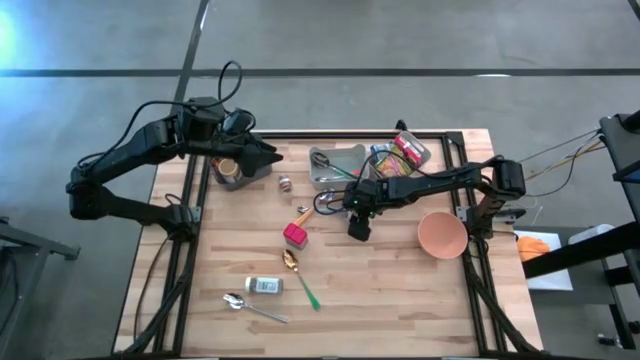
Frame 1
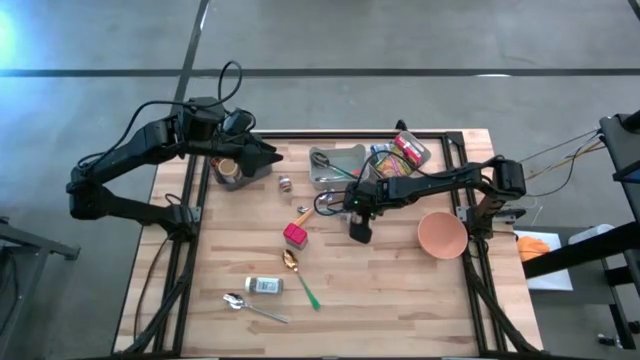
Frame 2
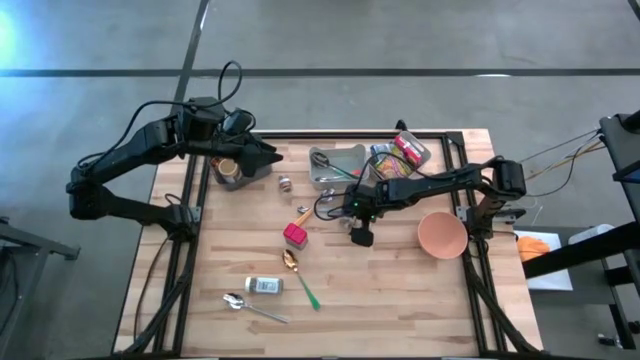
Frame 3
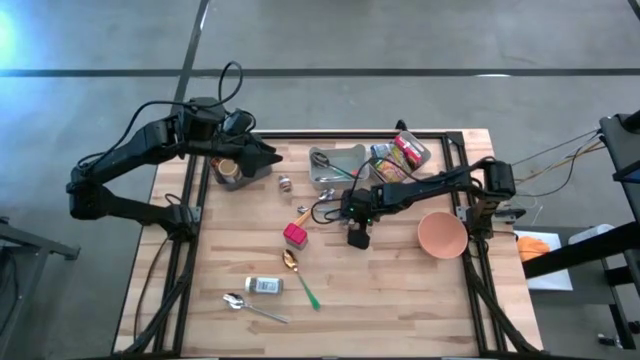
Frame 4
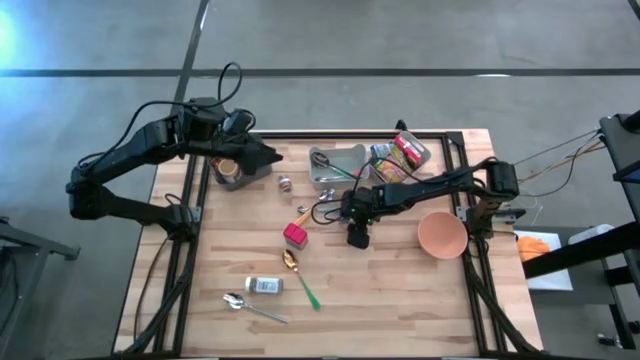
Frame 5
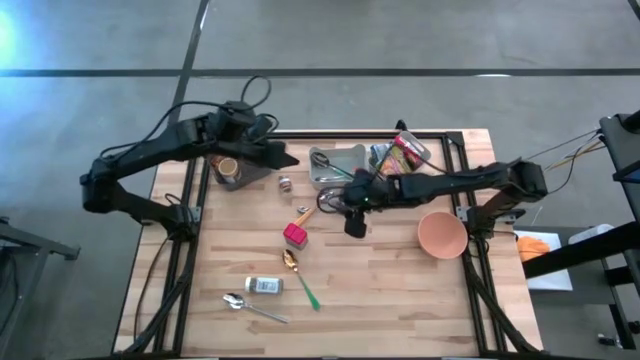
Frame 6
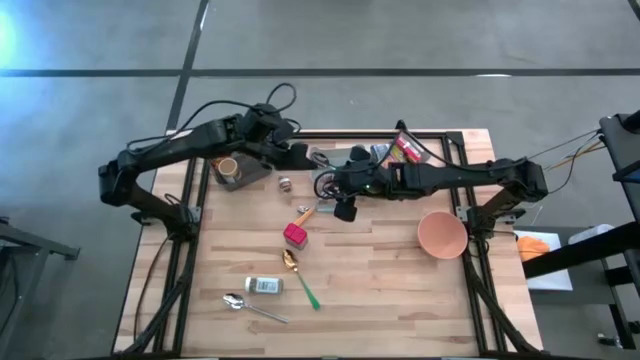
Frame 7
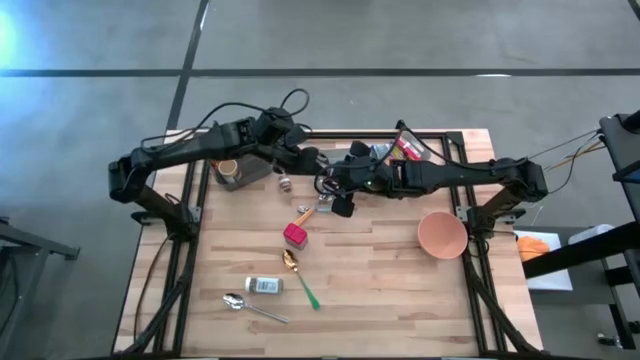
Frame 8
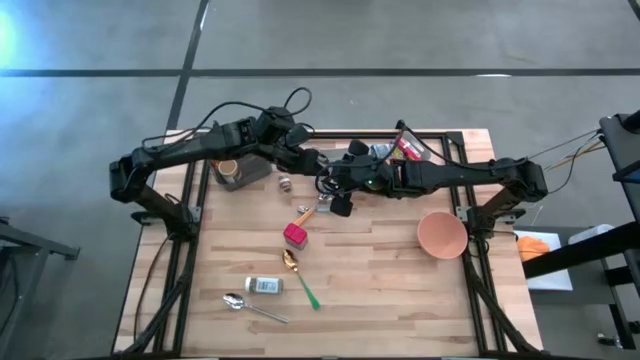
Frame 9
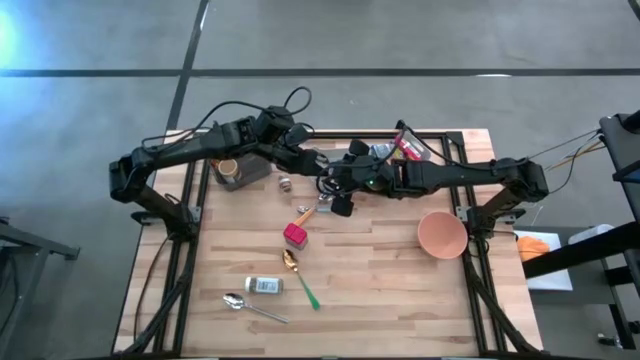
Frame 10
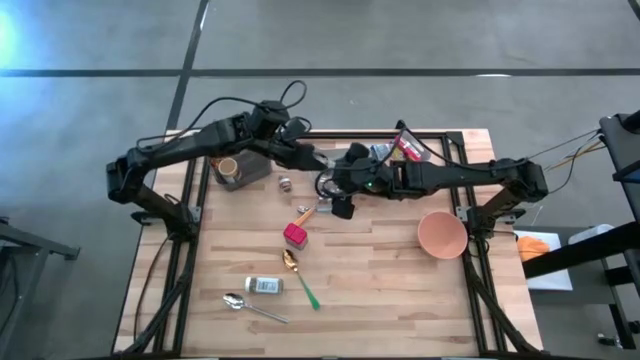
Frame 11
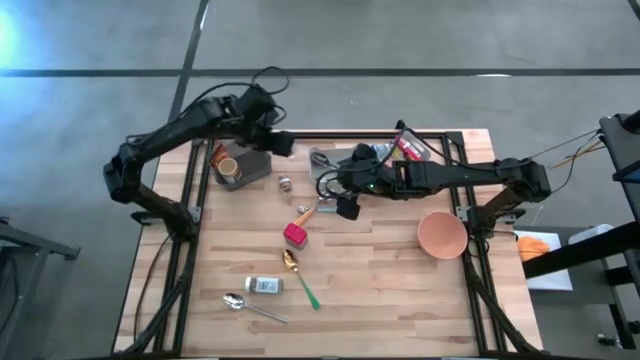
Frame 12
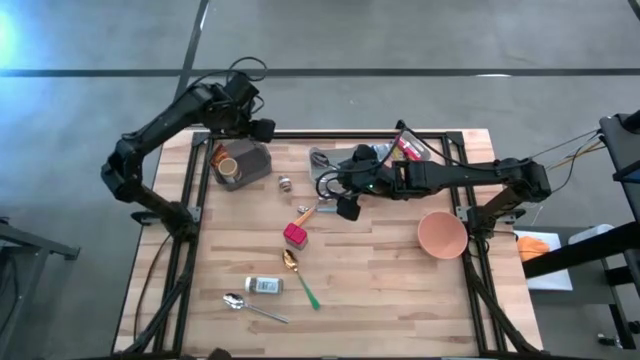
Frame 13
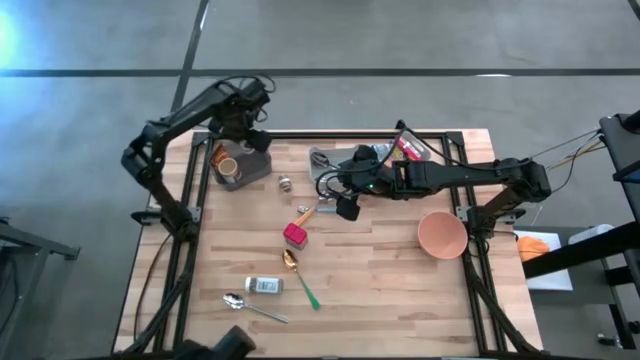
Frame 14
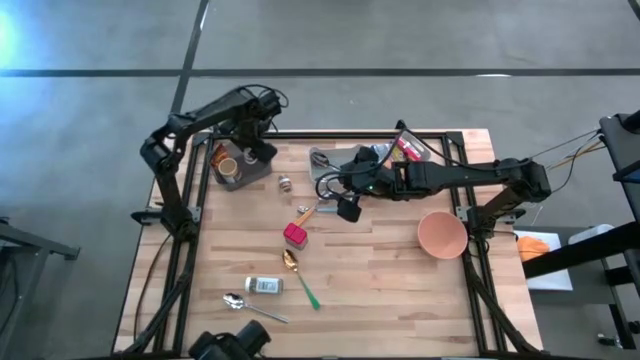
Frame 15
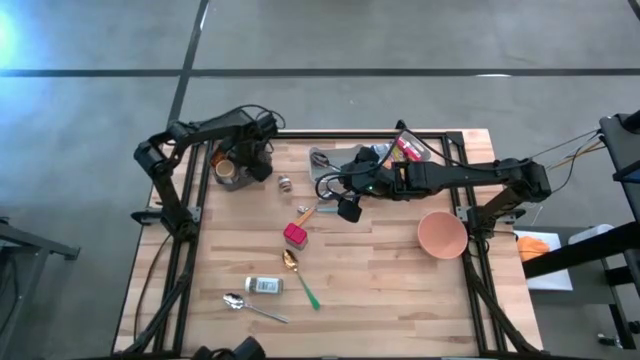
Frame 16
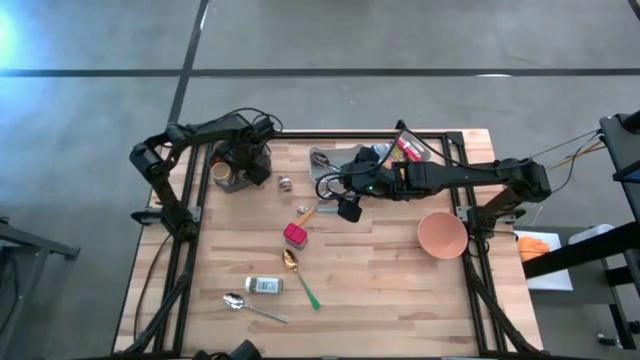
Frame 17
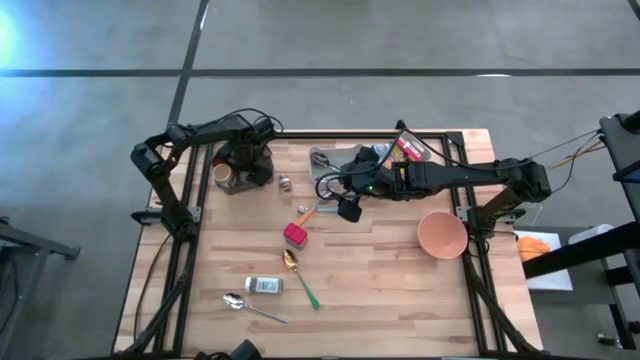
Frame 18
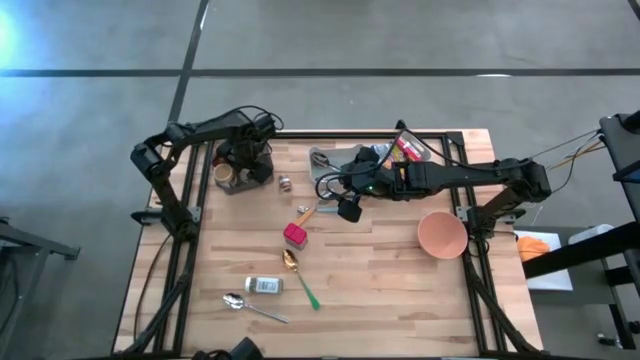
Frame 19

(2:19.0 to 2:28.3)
Put the bottom brown seasoning bottle into the black bin

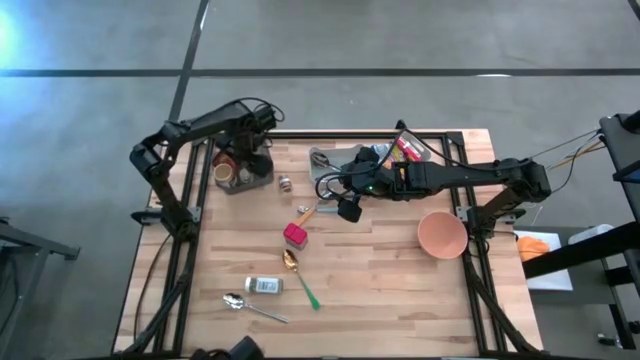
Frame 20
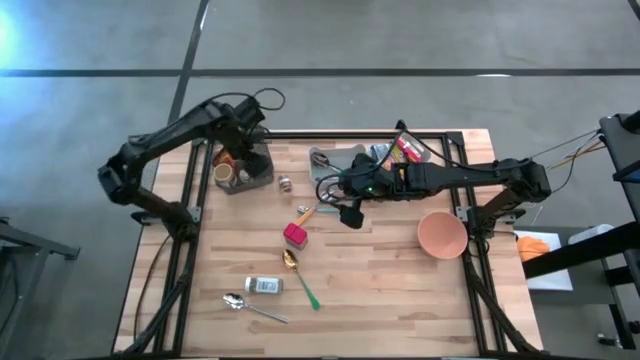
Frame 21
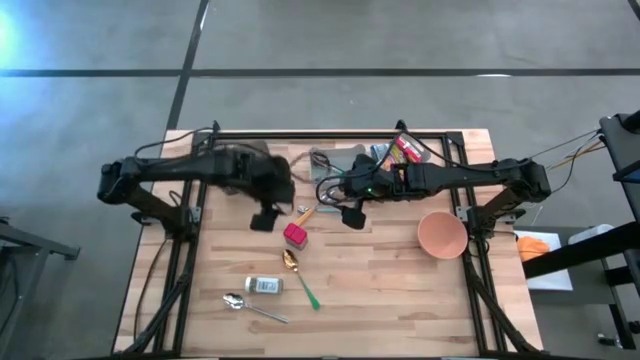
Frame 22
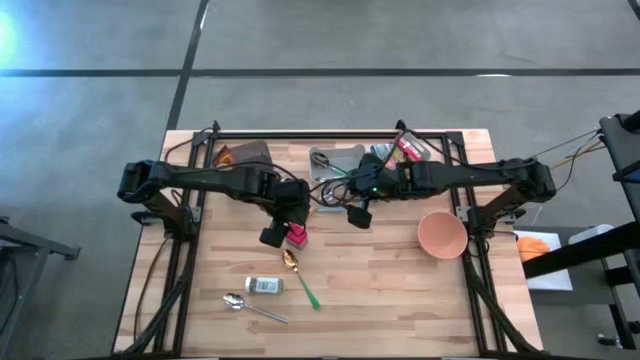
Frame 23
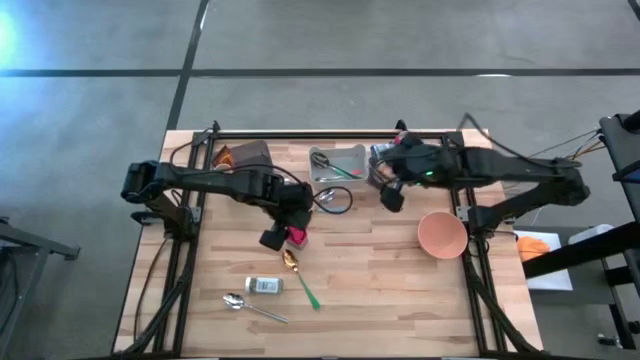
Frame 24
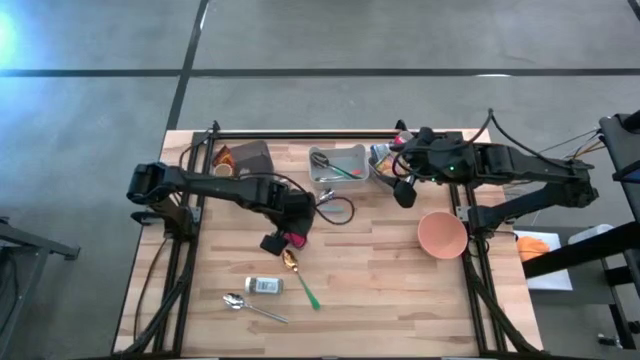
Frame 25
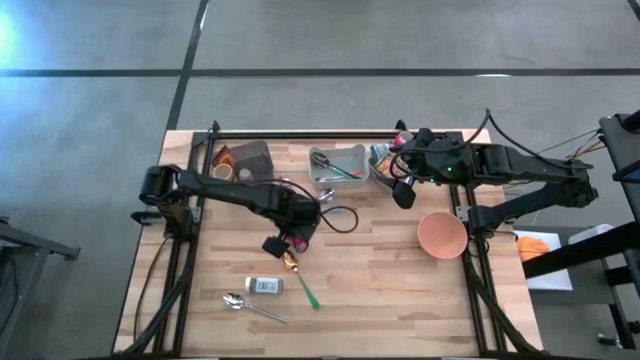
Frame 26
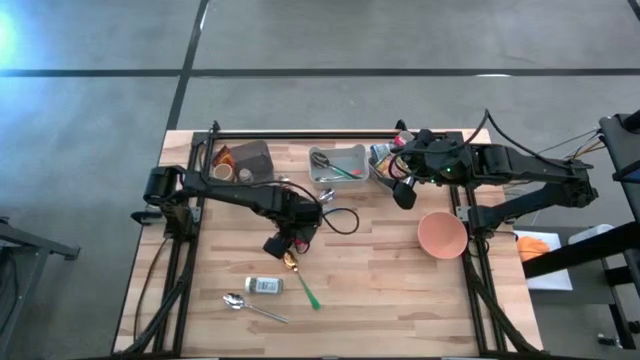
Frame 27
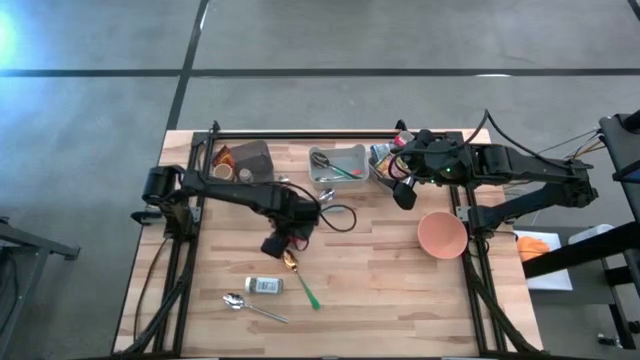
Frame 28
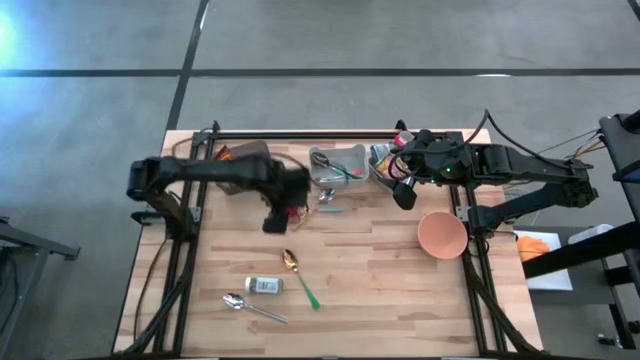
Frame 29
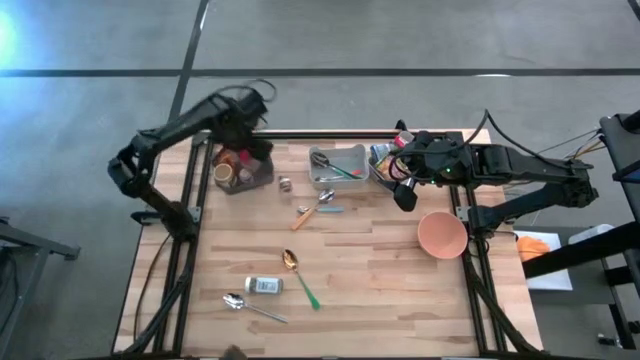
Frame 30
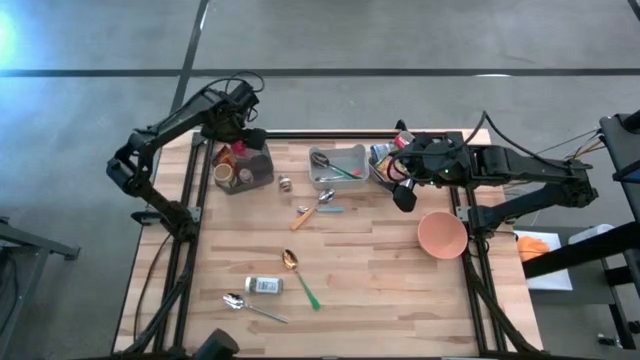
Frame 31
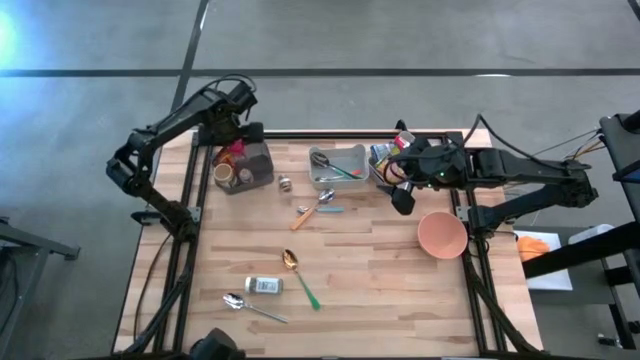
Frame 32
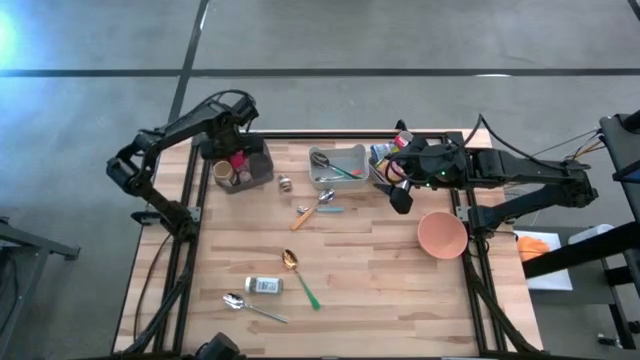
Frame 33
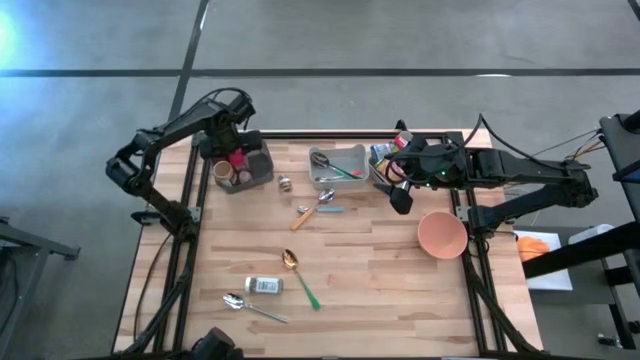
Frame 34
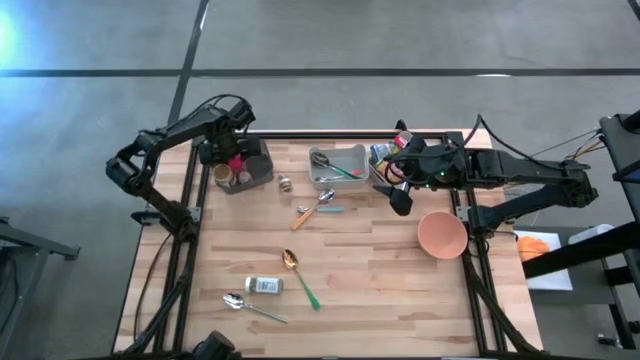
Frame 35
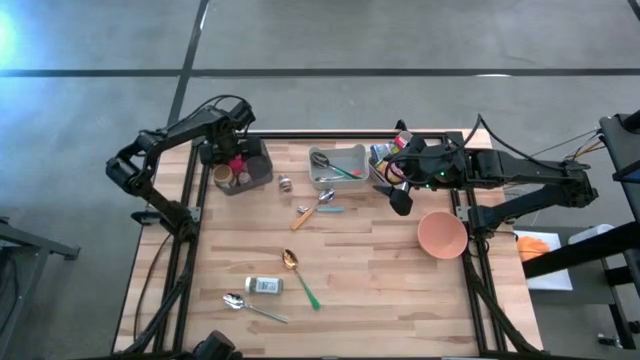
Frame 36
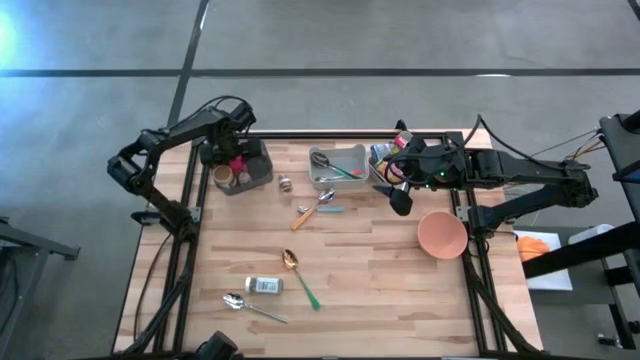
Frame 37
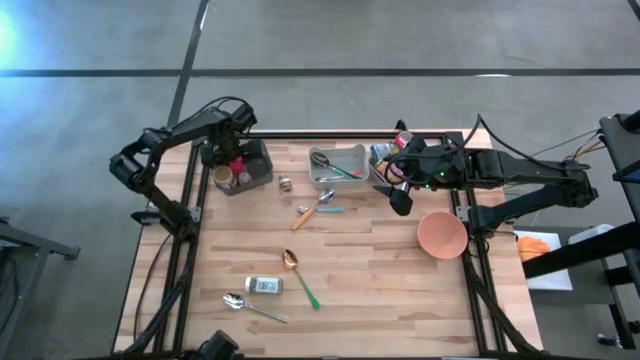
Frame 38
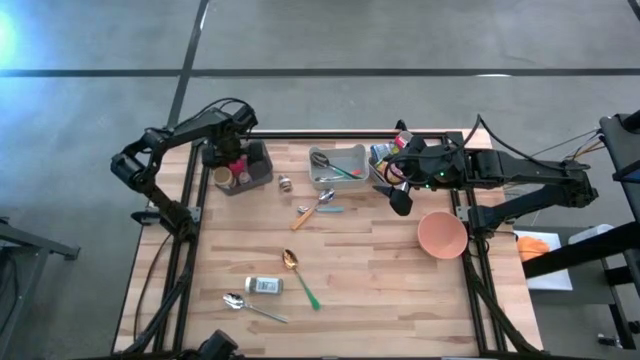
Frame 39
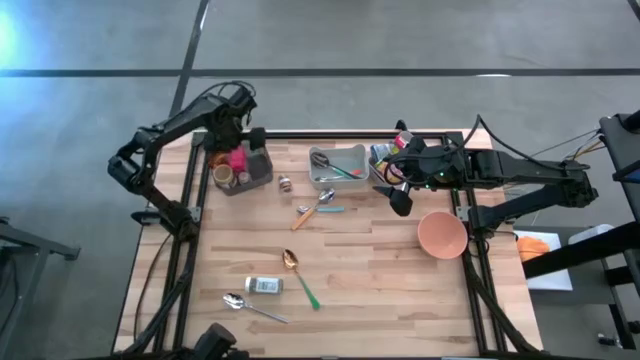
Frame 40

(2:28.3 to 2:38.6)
Put the red seasoning can into the black bin
